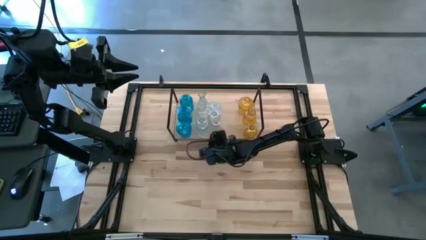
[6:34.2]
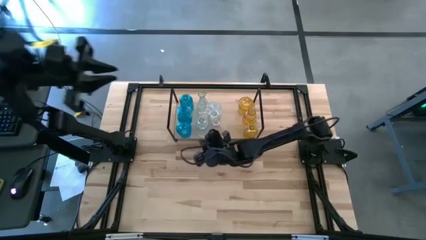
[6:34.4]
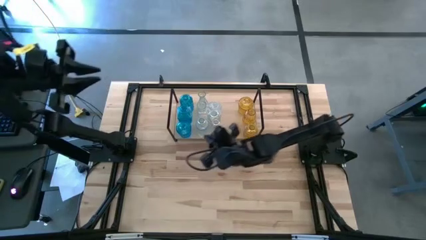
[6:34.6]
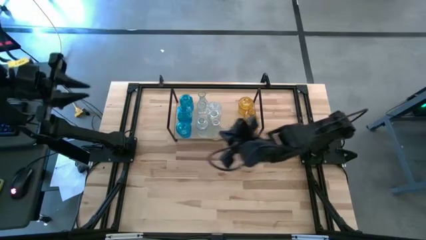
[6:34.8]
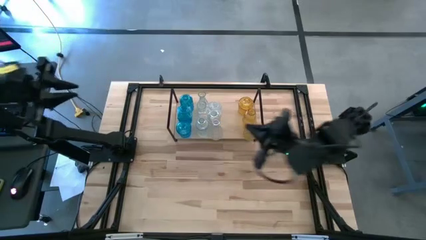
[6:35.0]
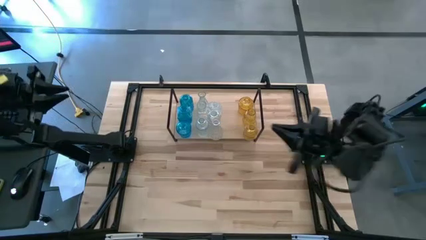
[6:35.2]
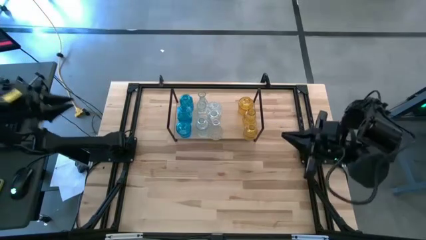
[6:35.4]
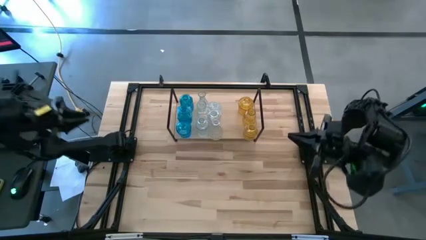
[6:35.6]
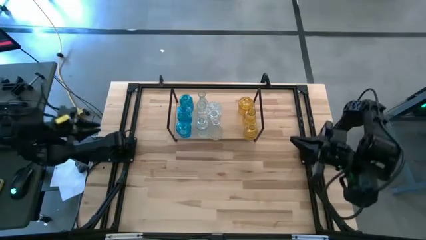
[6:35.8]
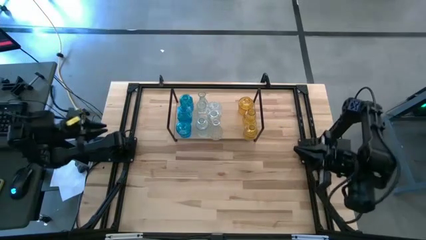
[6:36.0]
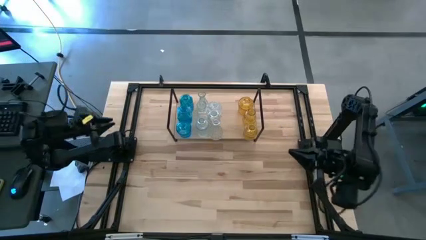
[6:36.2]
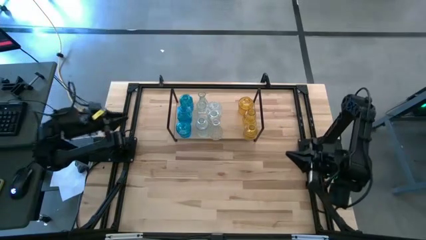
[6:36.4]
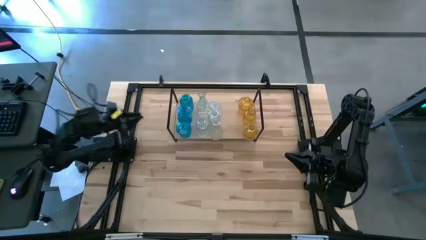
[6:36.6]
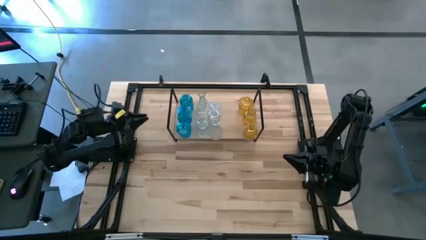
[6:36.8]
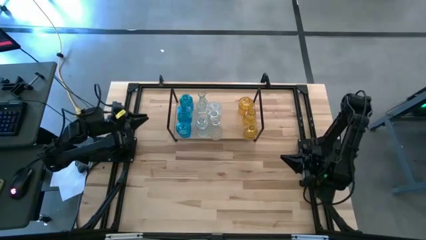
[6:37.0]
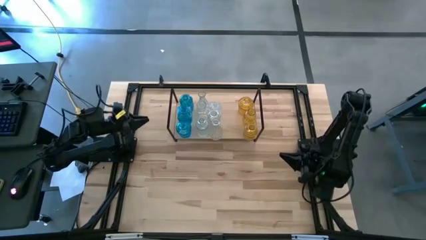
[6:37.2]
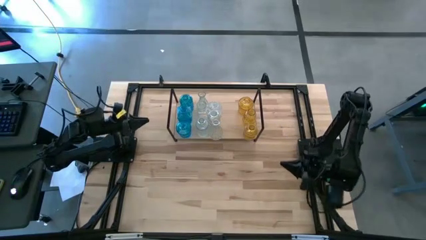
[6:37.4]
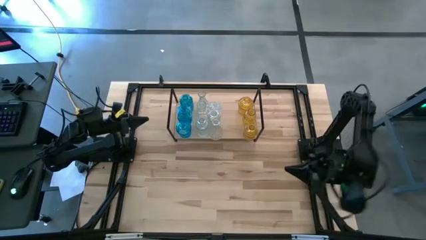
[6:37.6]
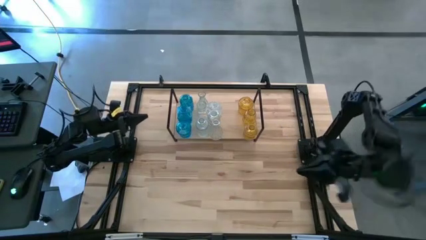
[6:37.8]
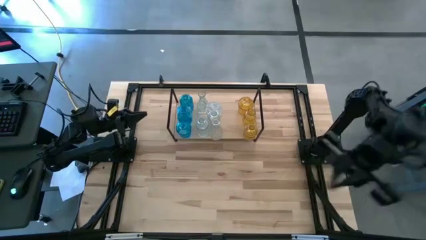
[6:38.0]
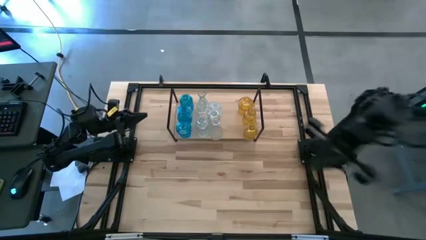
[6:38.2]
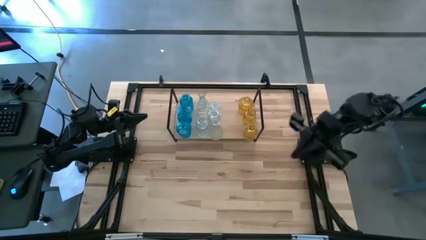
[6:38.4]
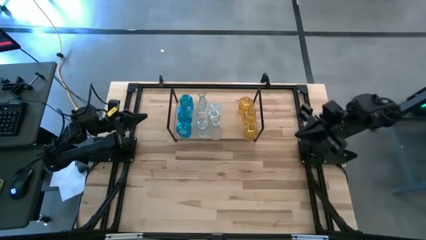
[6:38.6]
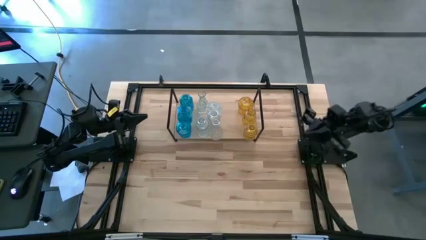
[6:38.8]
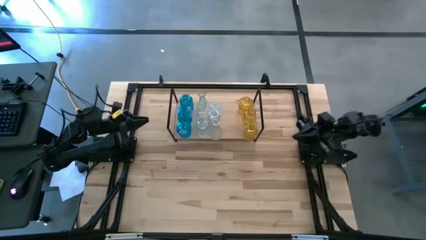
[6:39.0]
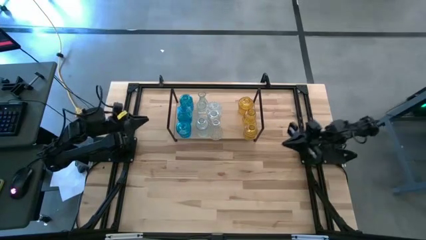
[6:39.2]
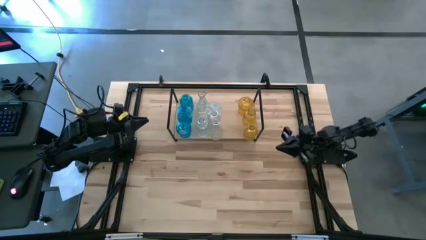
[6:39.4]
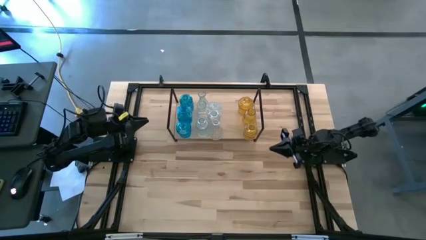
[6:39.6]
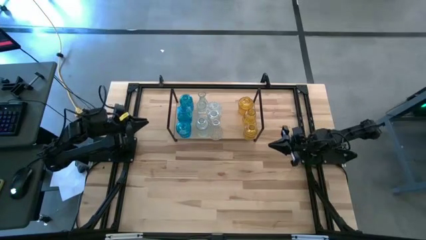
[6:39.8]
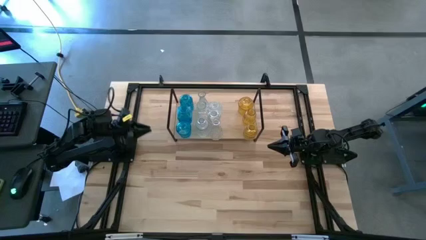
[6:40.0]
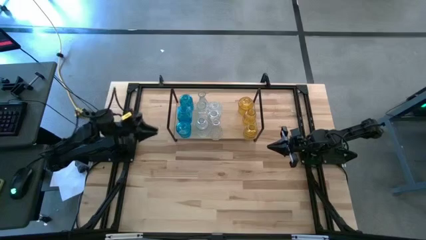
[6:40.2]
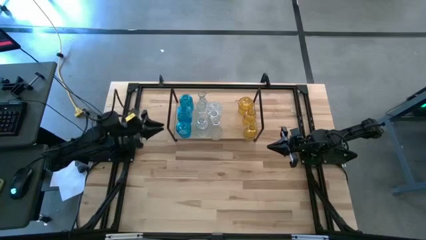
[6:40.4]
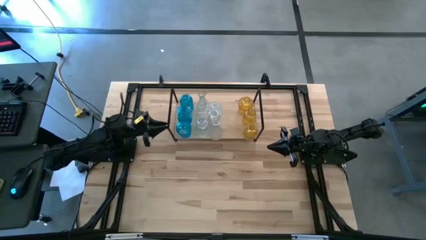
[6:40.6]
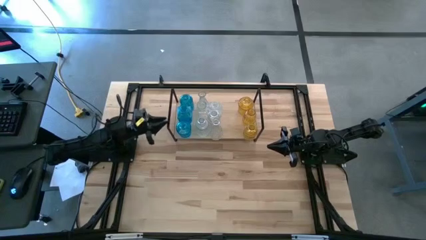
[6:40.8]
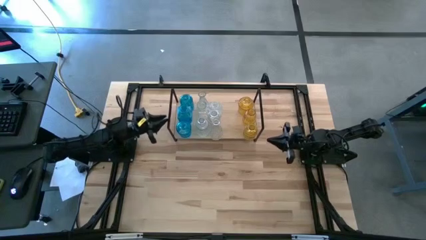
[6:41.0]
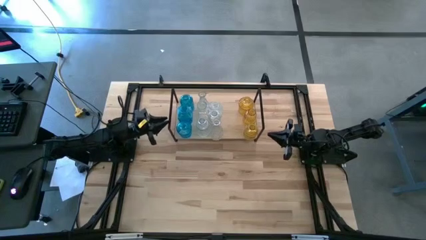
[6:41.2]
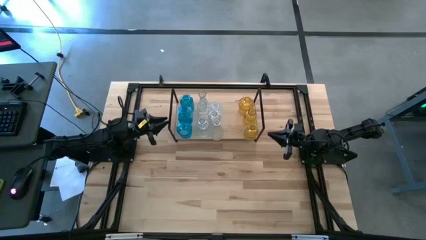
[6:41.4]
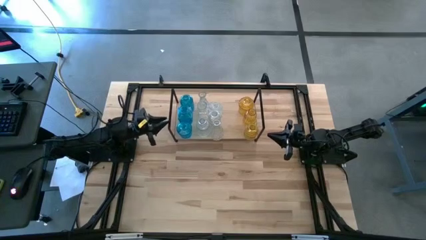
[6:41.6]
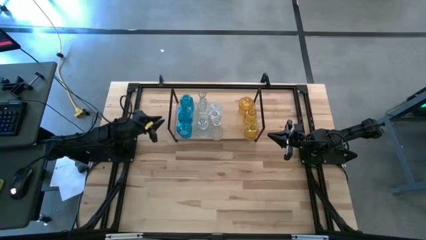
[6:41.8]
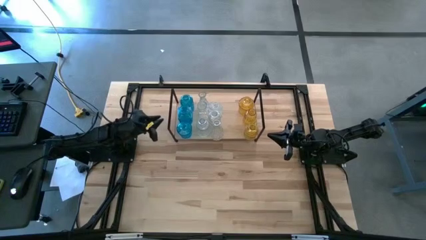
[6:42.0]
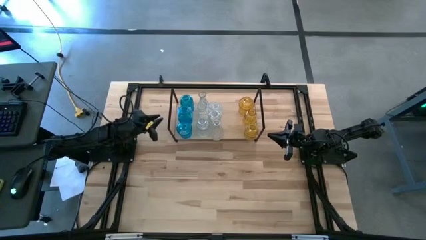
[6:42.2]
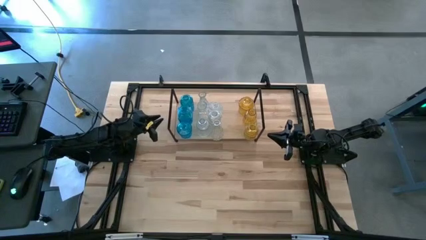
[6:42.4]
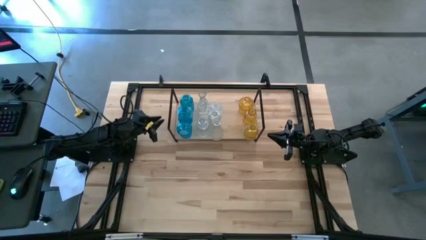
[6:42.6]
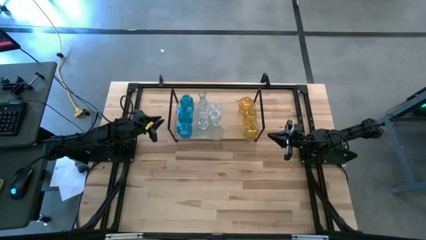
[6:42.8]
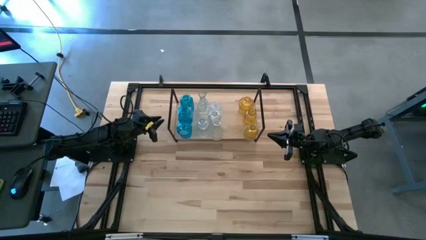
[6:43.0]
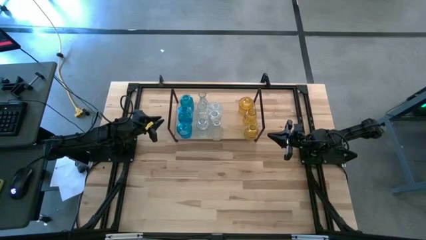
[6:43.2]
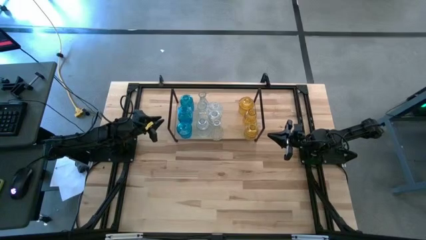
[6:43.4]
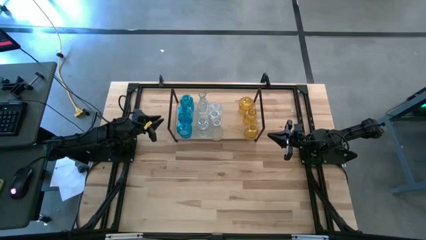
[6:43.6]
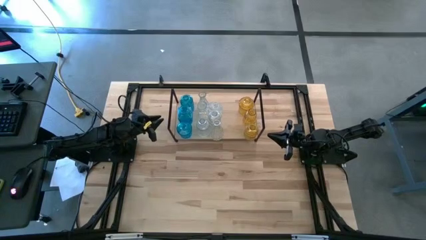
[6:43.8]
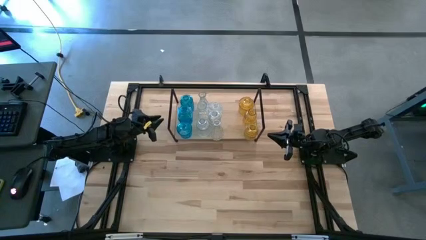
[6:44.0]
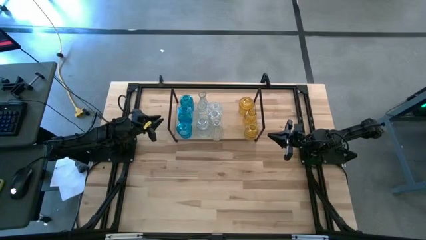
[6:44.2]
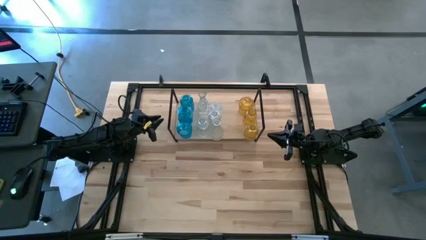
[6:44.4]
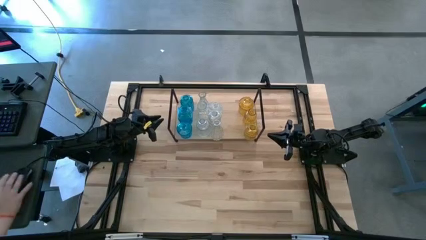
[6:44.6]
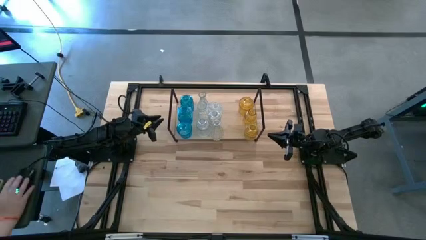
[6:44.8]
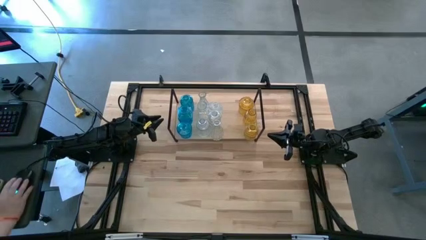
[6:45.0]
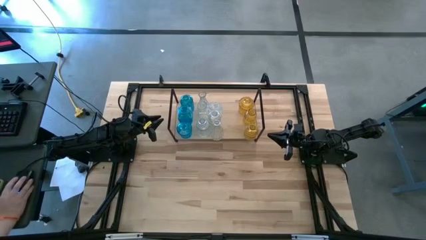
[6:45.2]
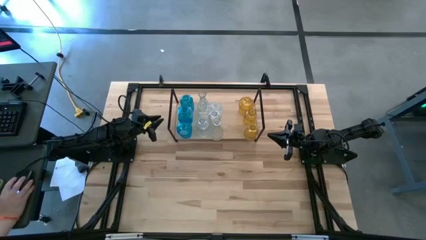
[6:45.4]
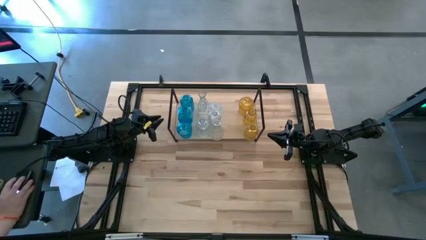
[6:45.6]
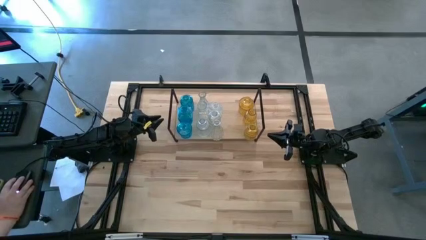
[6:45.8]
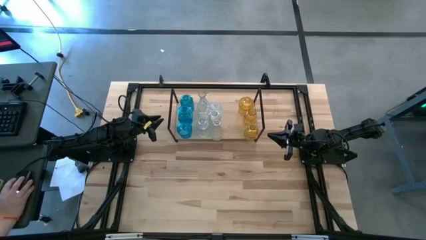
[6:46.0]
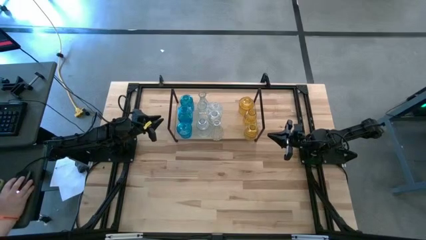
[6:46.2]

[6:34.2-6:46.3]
Task: sort vases onto shelf
Return to Home Position

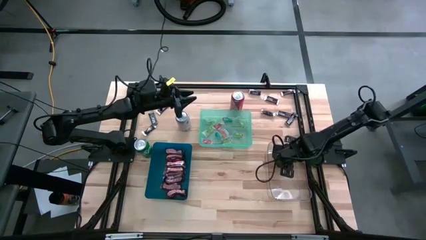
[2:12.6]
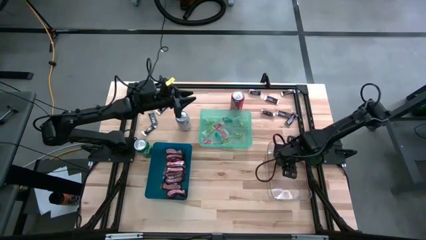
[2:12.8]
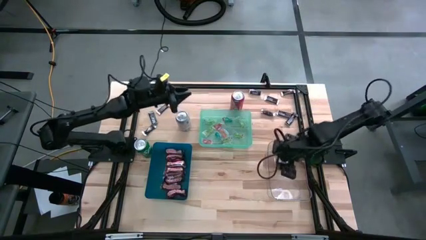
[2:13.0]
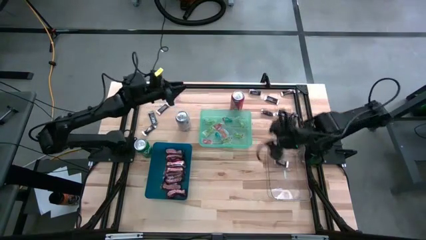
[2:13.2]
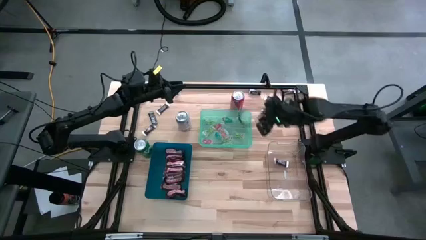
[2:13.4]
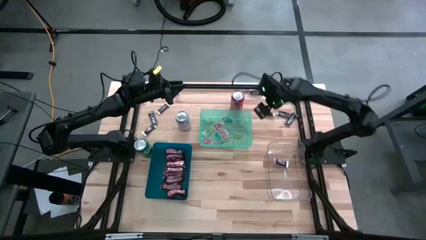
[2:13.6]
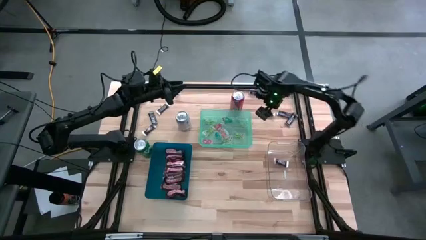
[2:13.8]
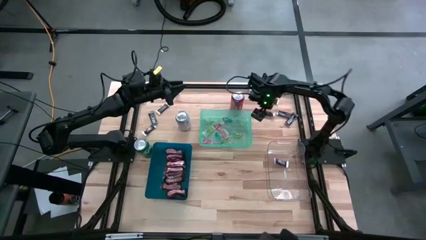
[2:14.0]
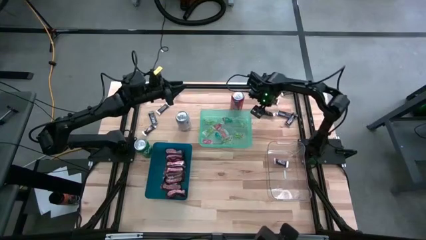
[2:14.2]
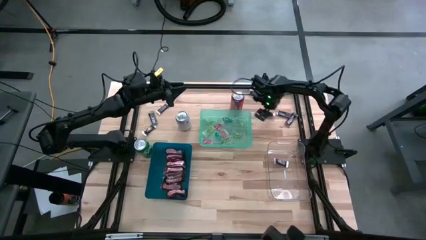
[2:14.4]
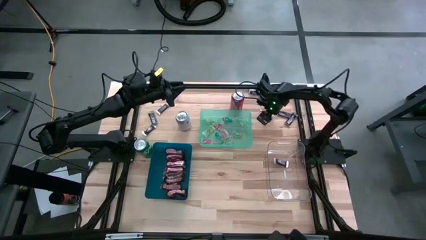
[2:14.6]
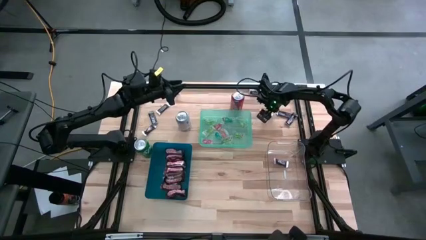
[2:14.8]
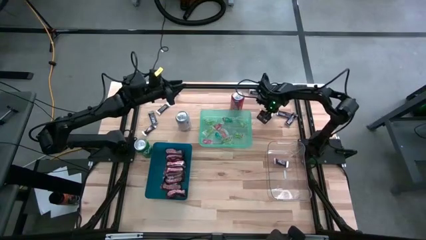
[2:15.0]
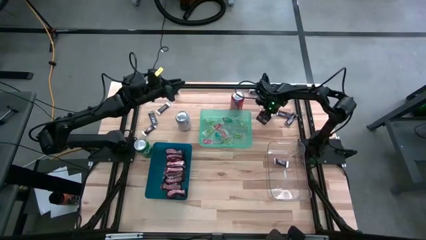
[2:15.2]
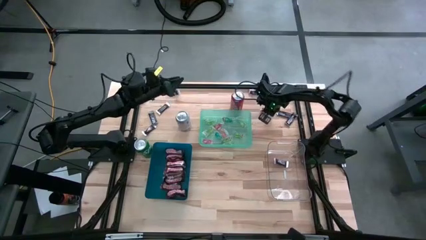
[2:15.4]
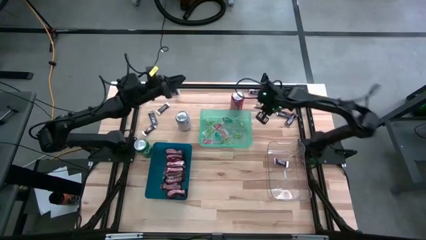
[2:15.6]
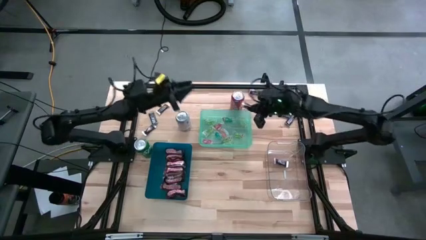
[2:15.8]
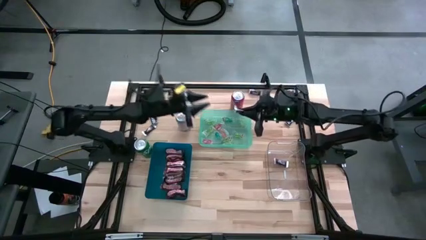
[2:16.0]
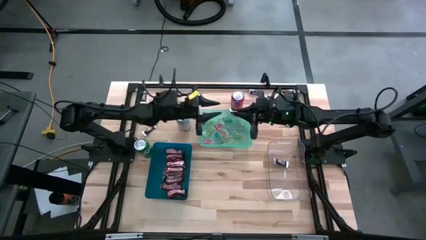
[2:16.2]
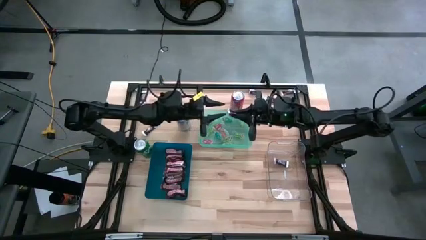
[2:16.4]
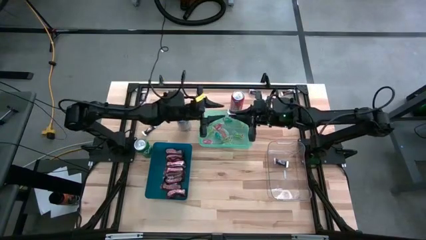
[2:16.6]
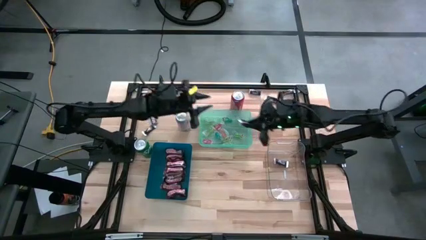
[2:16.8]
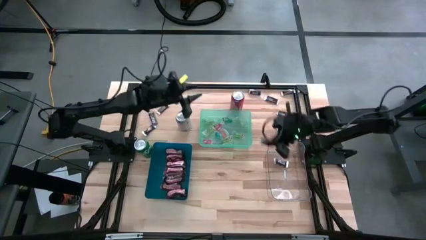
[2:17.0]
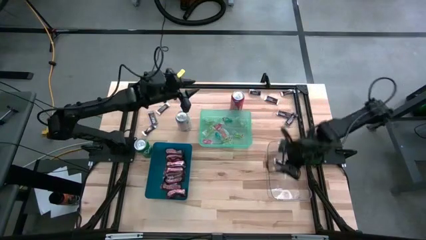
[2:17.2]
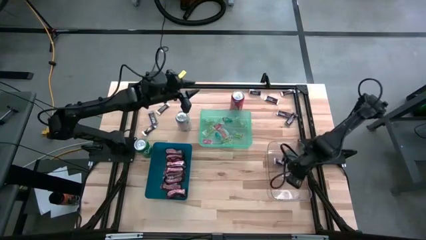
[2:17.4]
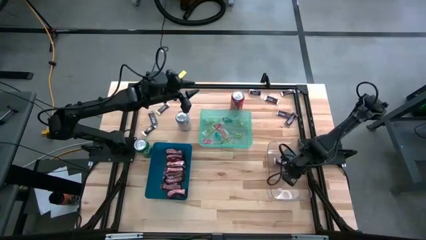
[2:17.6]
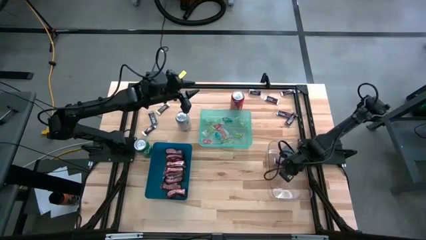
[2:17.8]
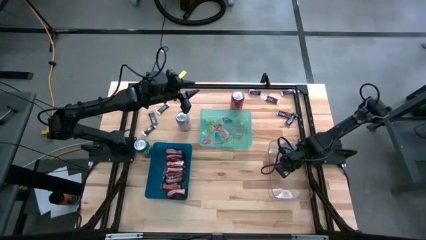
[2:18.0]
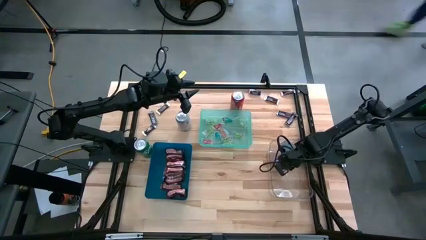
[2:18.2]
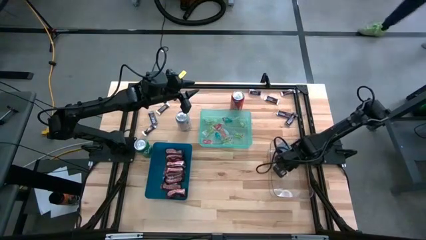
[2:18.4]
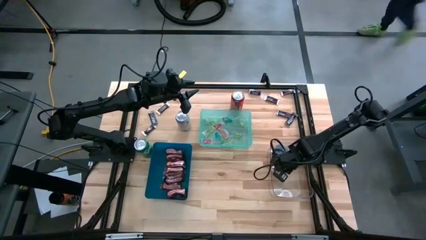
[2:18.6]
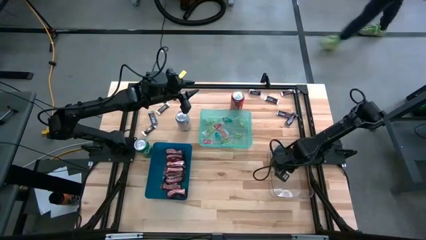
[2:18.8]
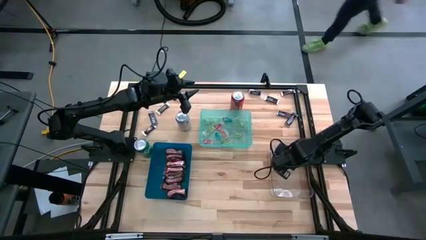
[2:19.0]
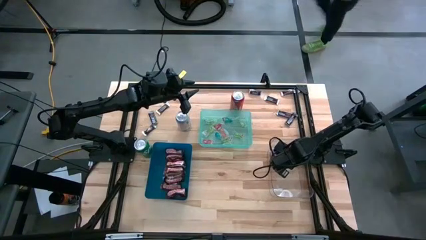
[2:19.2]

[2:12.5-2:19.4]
Task: Organize candy in baskets
Put the white brown chocolate into the transparent bin
